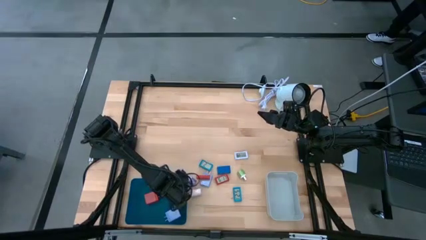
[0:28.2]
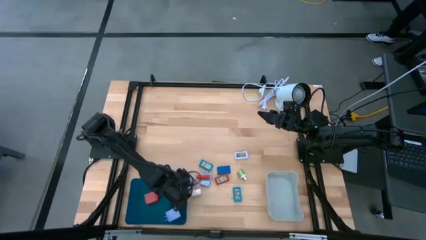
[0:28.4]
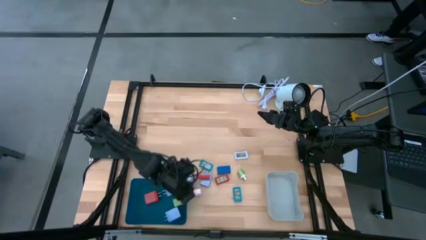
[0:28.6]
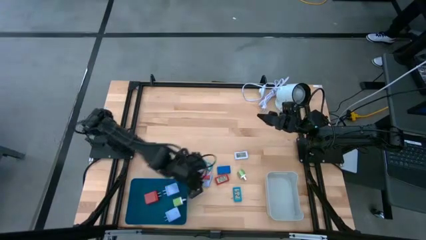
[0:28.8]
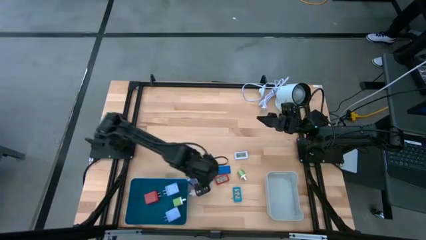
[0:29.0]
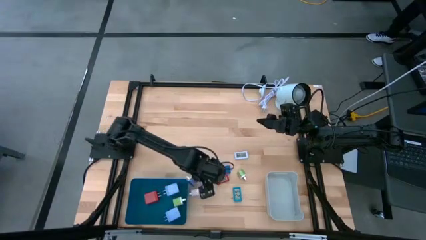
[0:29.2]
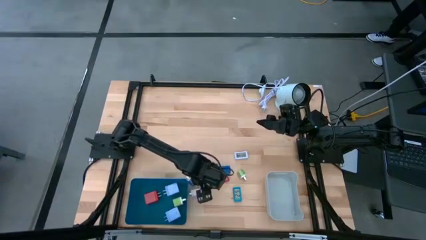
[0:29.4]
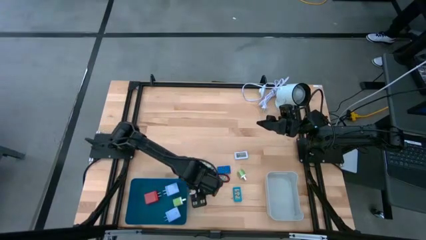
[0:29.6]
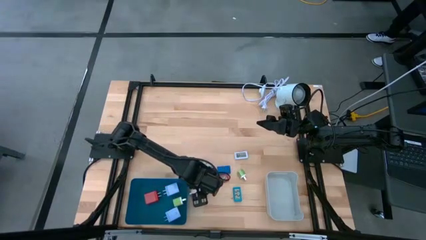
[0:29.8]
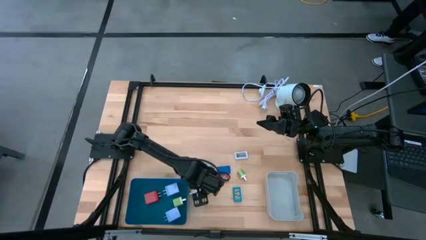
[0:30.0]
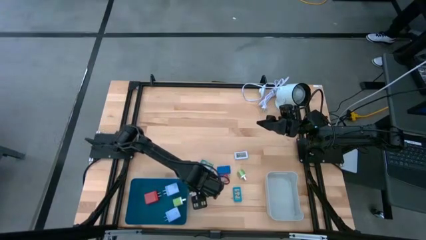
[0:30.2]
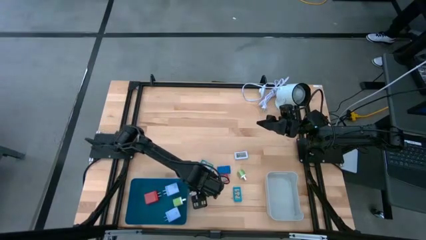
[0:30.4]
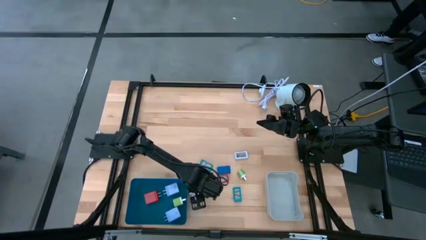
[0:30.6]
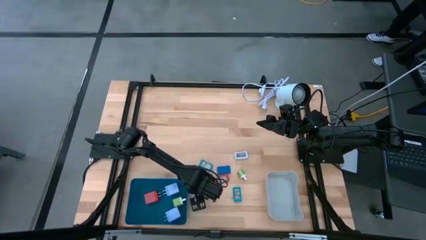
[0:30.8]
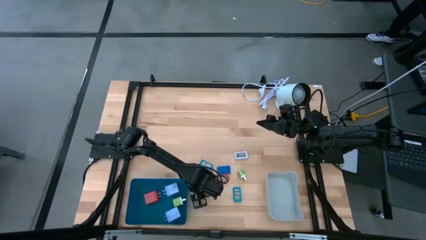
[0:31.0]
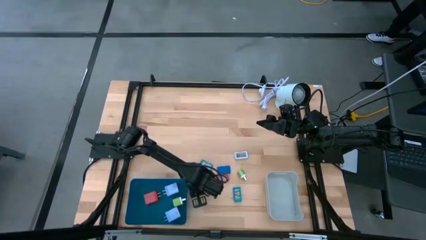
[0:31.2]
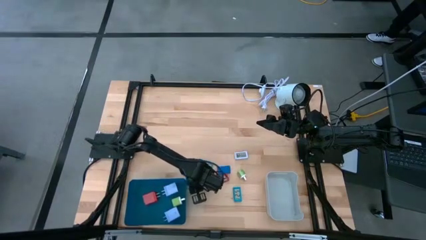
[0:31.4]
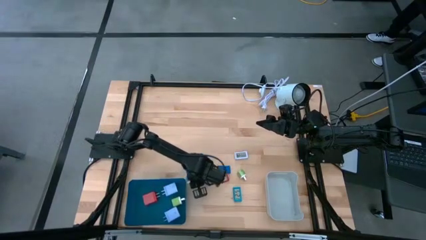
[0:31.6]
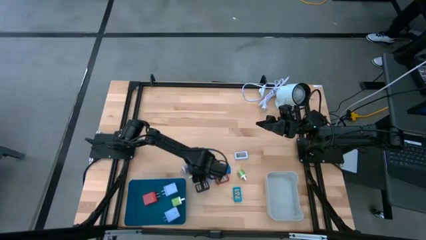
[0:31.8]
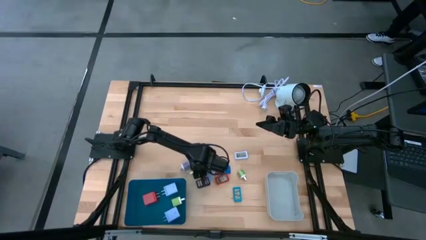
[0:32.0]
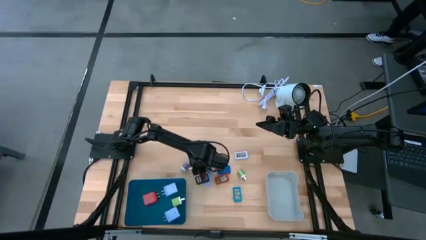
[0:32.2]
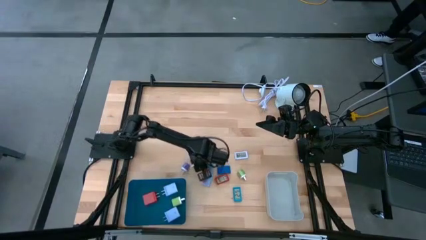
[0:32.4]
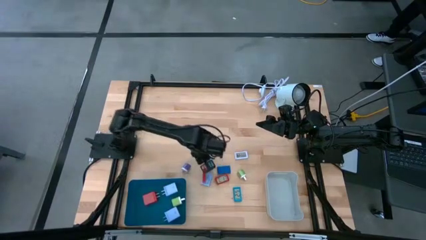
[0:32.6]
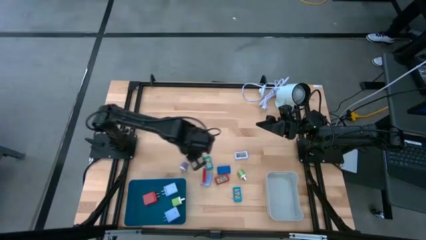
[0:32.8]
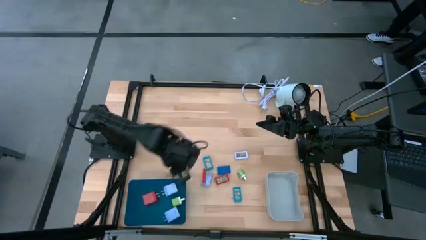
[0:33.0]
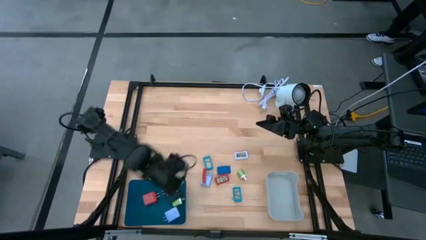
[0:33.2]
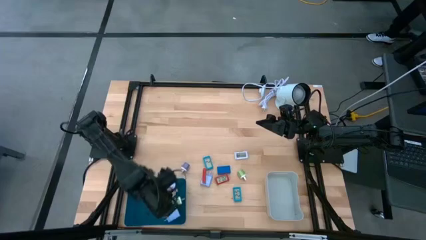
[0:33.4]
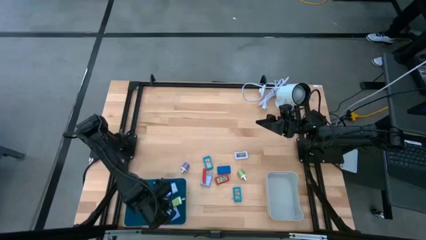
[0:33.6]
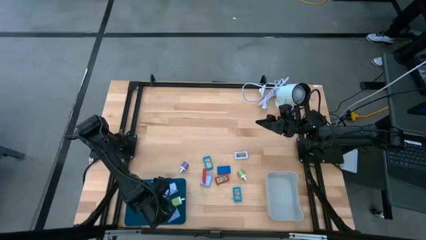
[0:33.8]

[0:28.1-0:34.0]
Task: Pick & Place Office items
Put the pink charger adapter into the blue bin

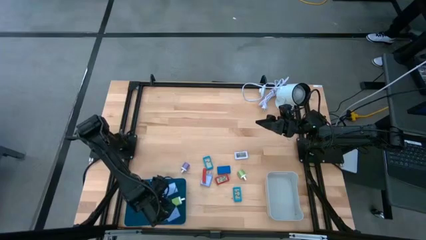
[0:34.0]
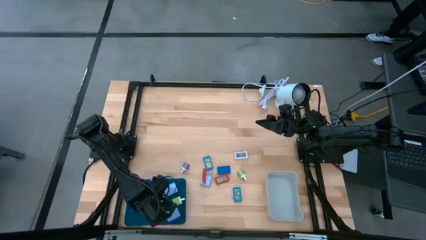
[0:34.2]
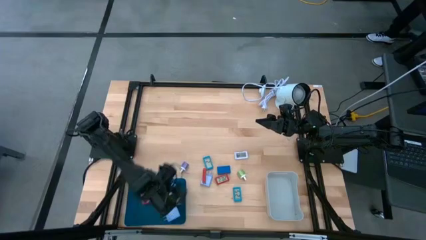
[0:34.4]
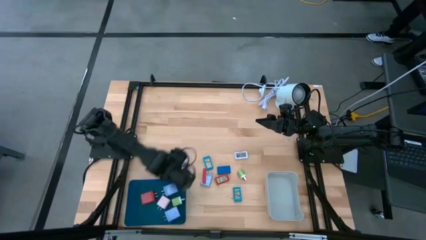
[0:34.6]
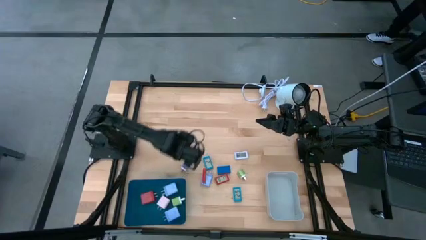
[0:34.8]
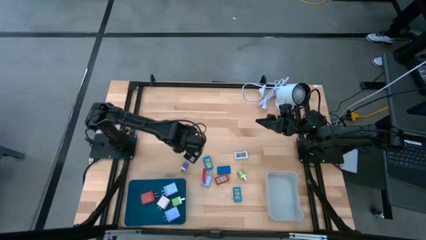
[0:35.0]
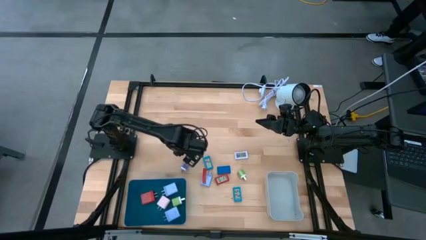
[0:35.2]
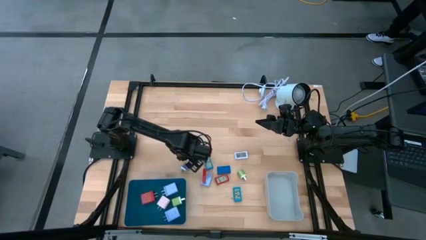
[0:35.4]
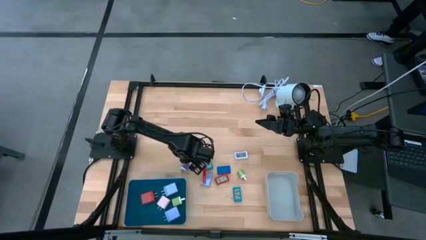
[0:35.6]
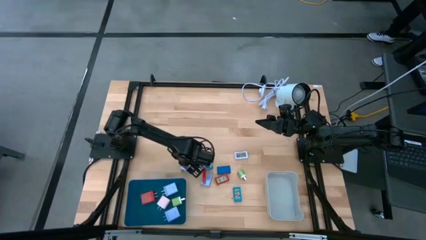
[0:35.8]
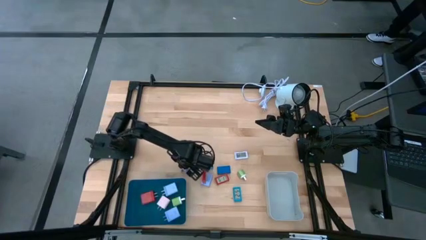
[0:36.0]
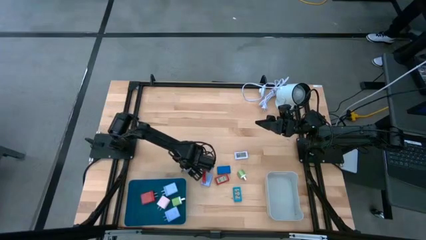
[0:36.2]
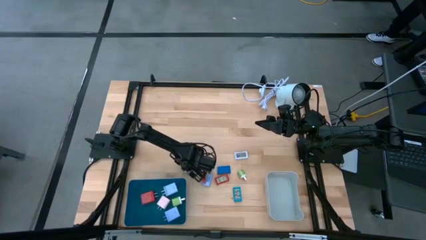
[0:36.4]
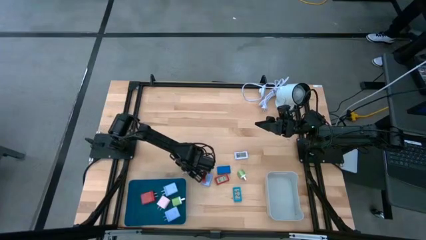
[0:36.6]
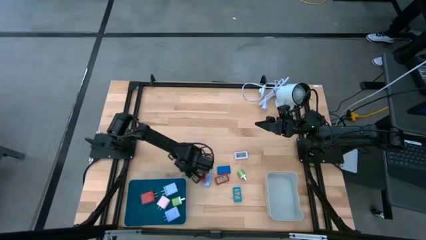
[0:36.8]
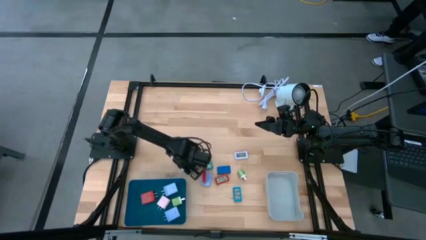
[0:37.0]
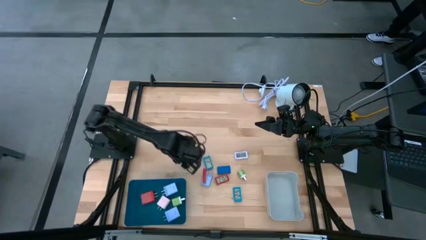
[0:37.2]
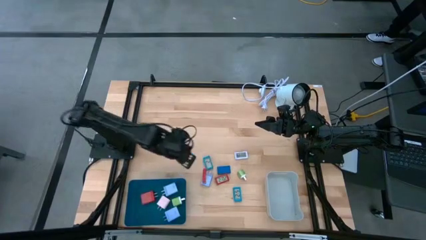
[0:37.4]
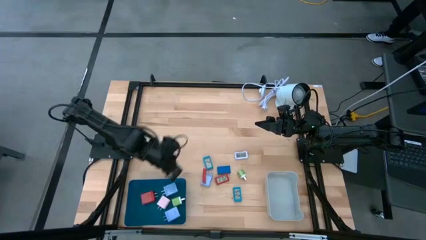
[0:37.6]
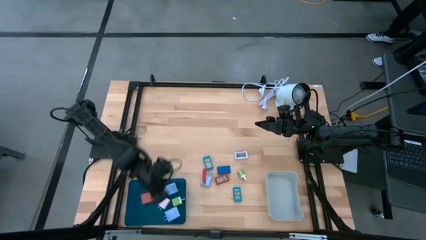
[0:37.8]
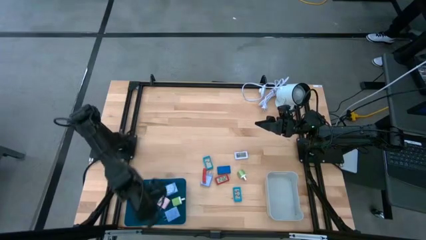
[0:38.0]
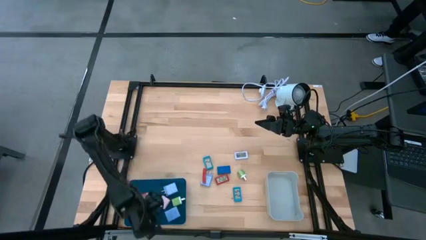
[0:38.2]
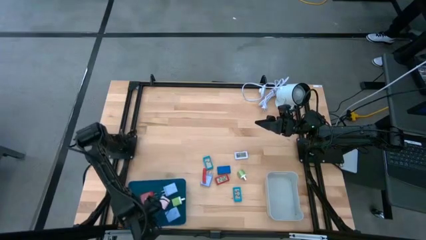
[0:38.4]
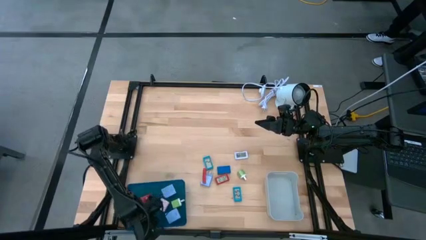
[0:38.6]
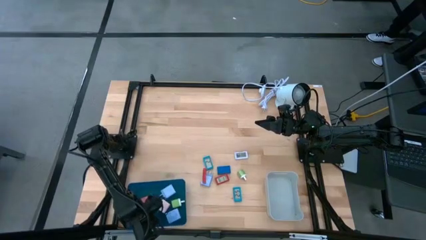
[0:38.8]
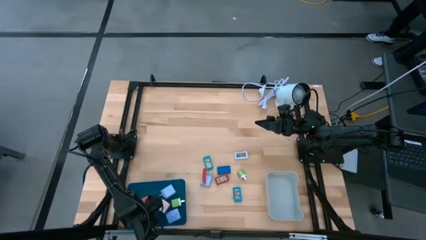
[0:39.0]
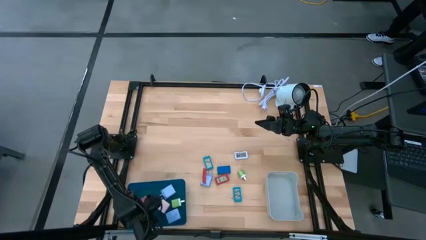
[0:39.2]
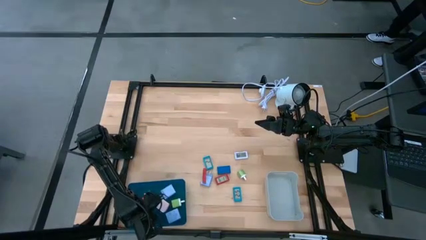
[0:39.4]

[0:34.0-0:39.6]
Put the violet charger adapter into the blue bin

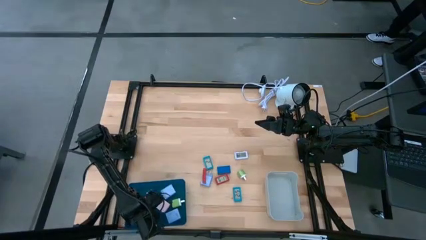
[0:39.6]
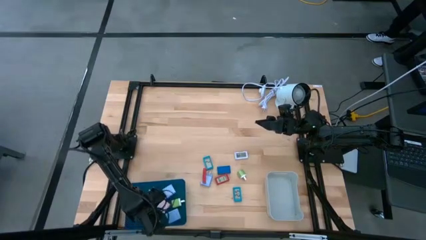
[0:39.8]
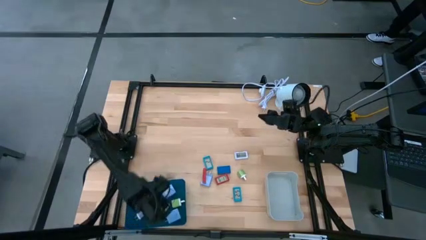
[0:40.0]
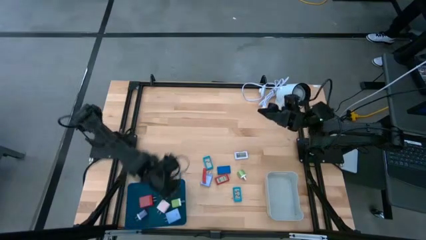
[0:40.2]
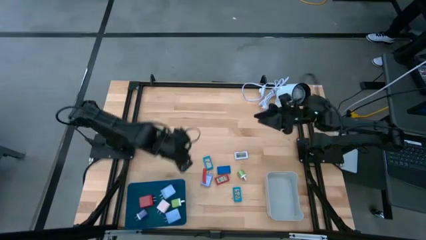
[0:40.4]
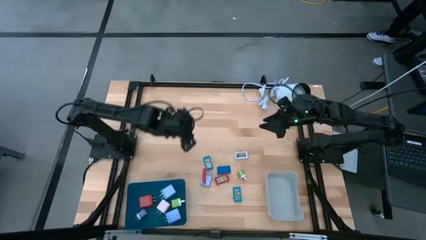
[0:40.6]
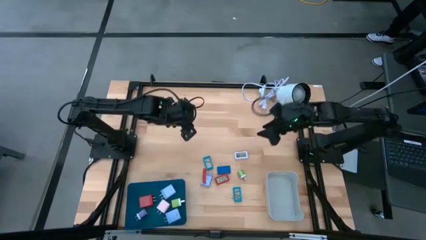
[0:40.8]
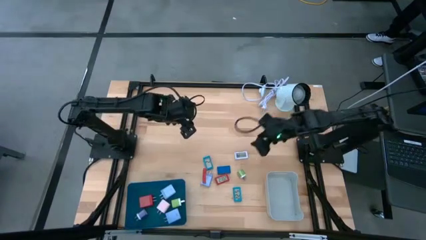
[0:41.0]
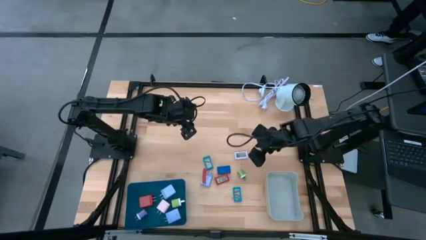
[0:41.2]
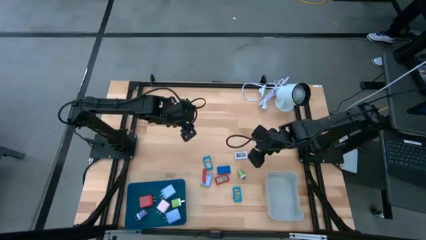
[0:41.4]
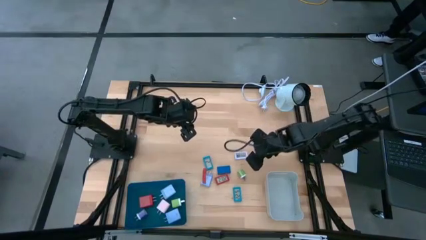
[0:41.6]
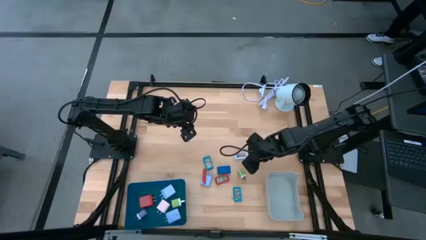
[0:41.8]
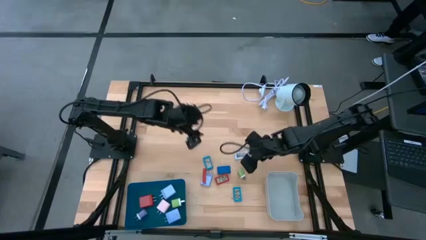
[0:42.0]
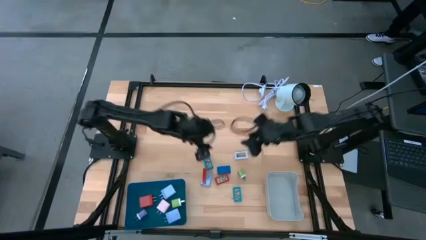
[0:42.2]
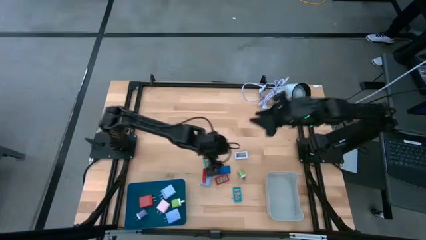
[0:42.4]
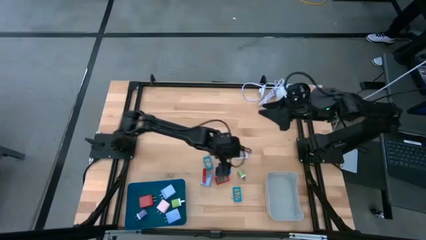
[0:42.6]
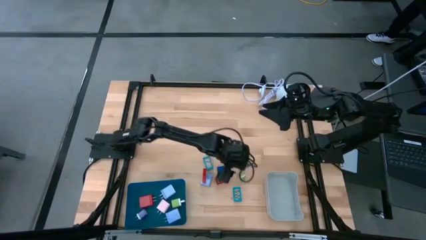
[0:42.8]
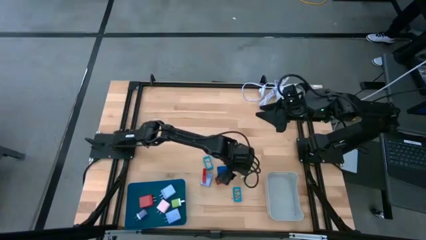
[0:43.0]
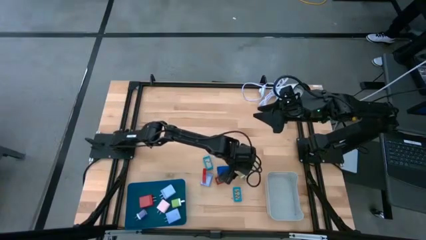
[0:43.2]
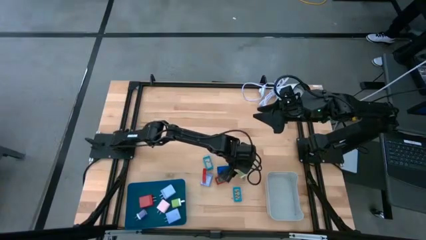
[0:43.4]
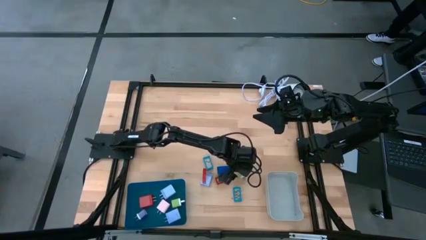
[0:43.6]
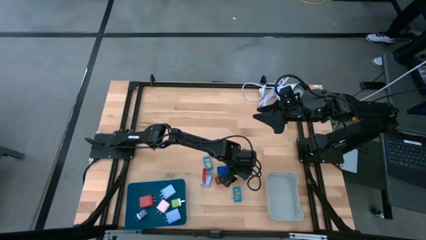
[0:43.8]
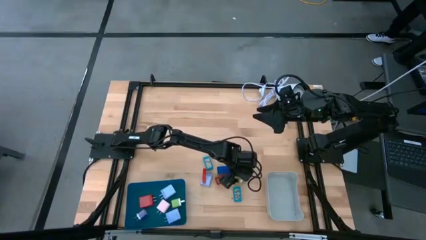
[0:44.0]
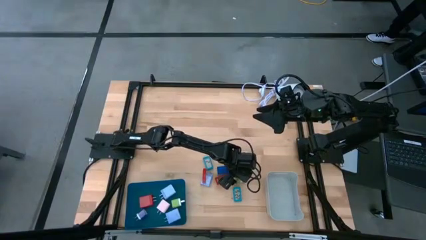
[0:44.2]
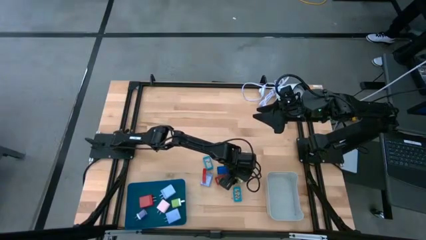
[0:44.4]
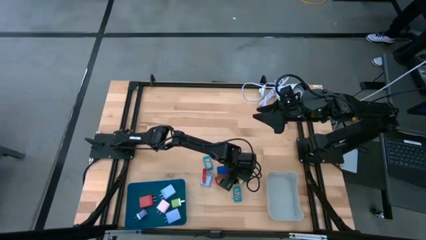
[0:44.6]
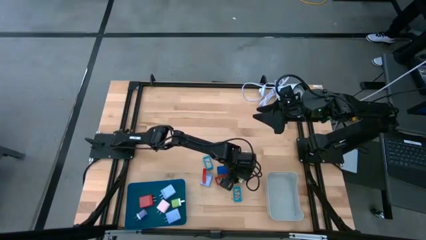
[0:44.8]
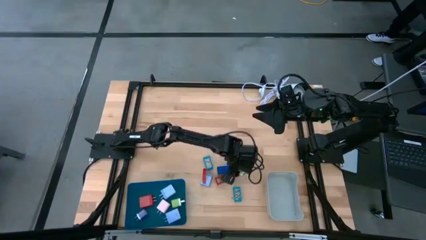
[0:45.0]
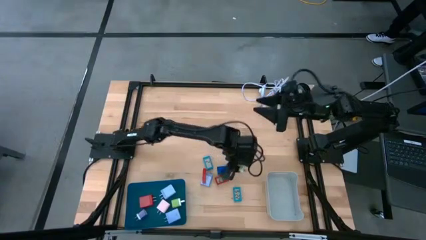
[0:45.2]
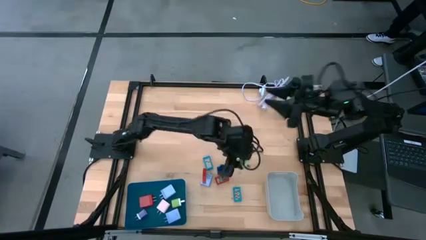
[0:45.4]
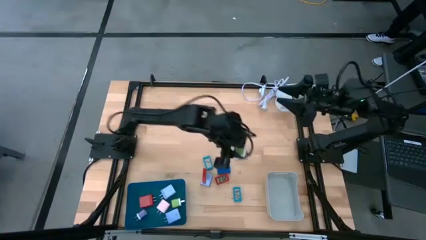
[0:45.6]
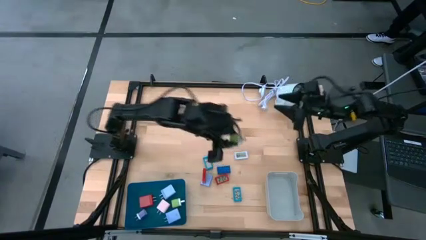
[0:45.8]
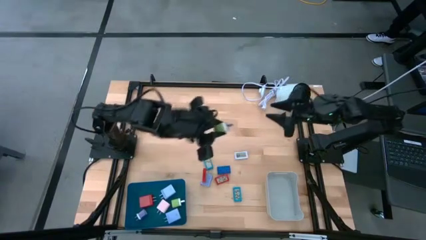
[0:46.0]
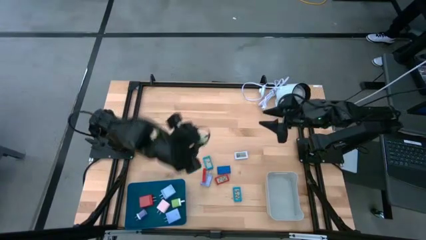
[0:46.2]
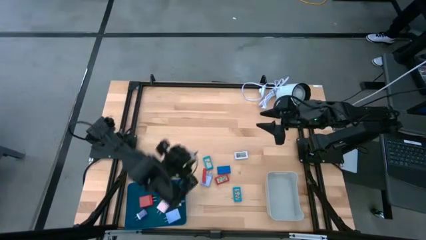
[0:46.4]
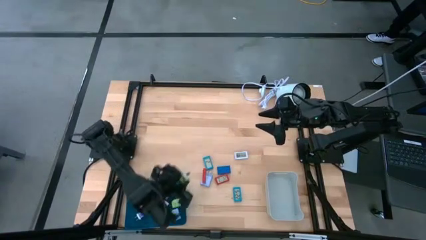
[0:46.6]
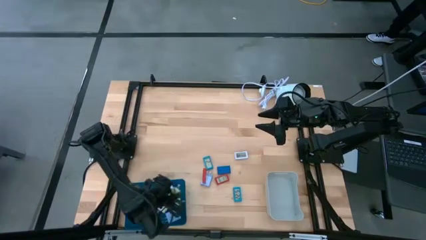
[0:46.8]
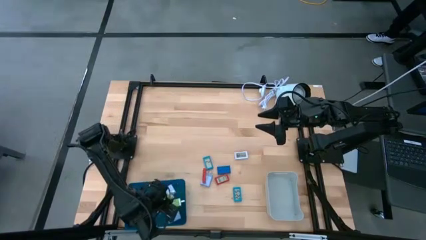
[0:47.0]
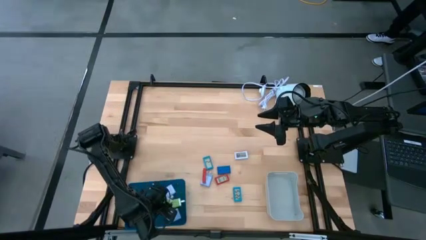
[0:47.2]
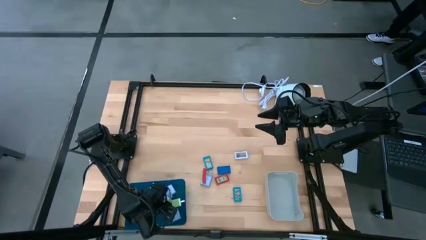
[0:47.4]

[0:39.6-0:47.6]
Put the green charger adapter into the blue bin
